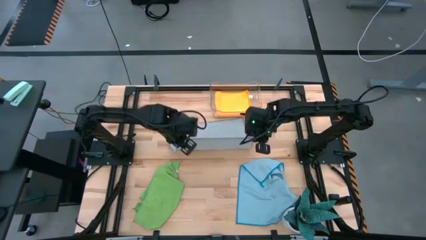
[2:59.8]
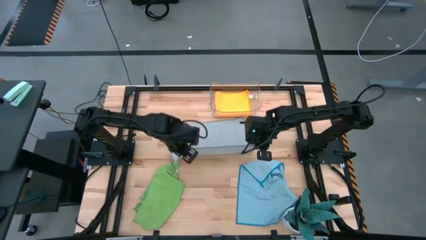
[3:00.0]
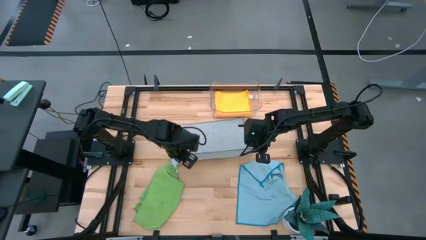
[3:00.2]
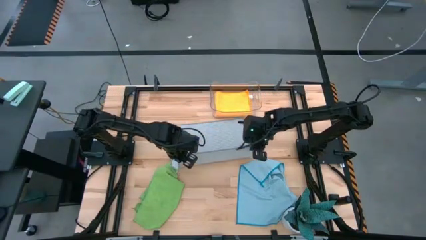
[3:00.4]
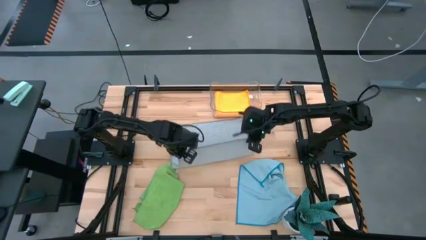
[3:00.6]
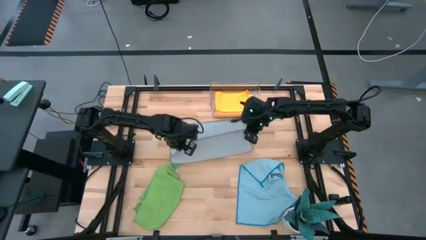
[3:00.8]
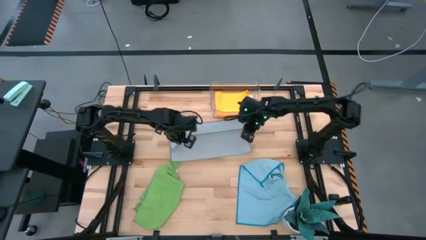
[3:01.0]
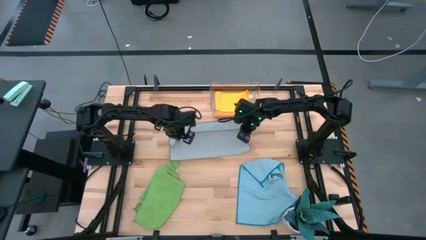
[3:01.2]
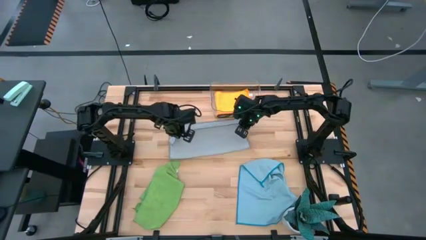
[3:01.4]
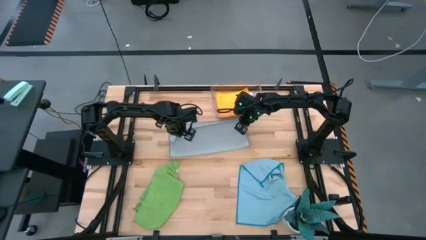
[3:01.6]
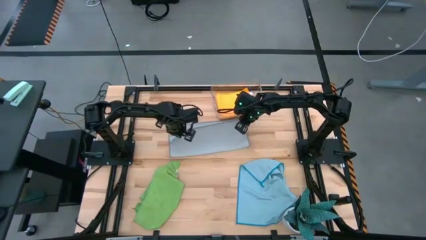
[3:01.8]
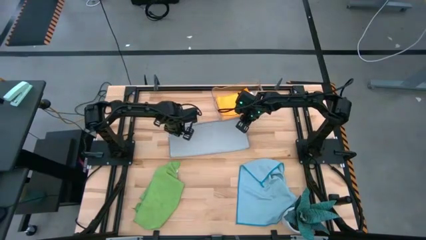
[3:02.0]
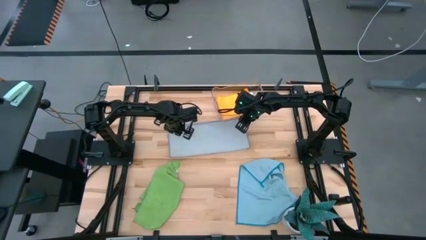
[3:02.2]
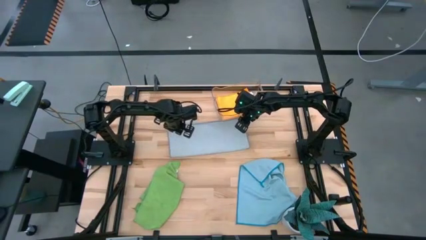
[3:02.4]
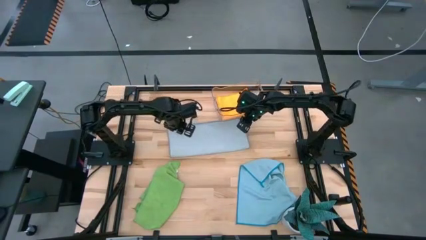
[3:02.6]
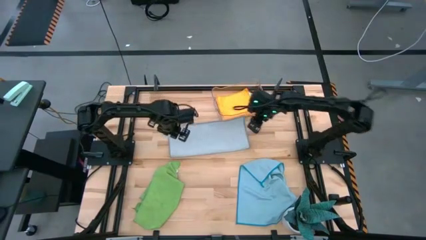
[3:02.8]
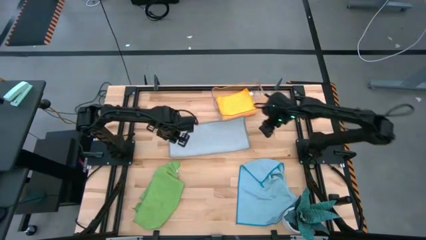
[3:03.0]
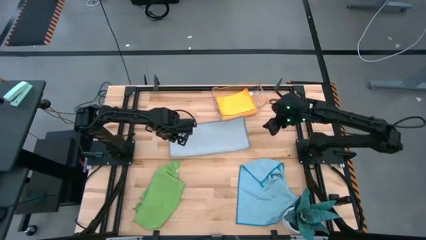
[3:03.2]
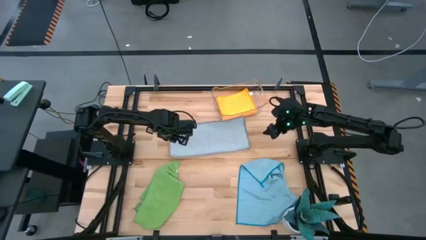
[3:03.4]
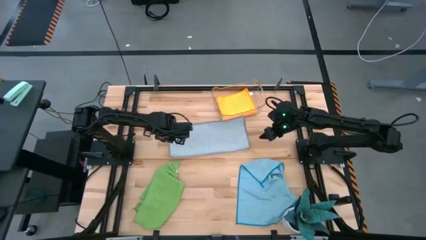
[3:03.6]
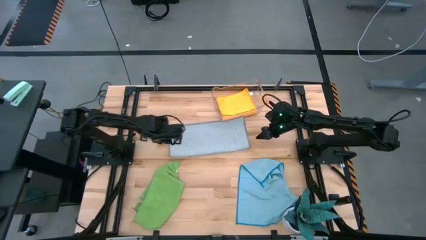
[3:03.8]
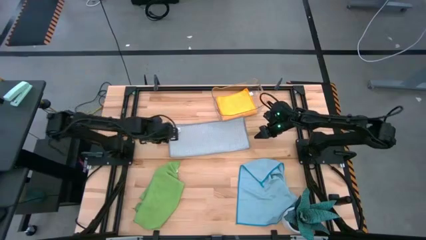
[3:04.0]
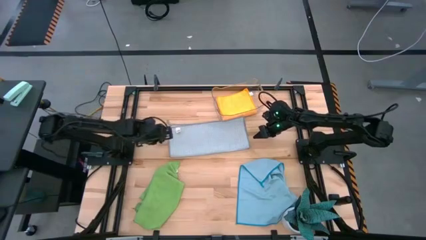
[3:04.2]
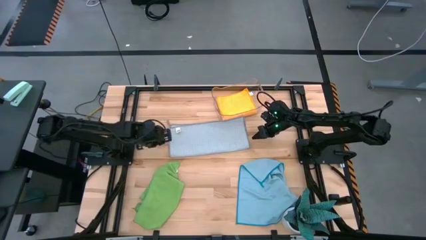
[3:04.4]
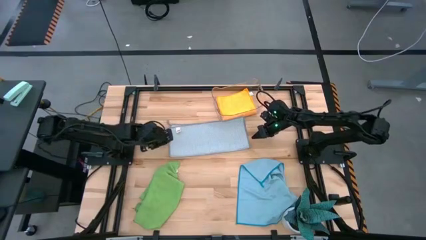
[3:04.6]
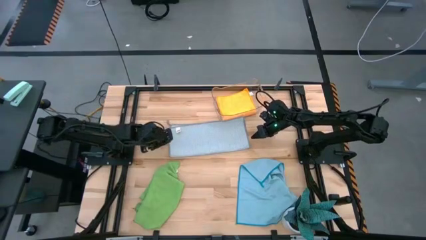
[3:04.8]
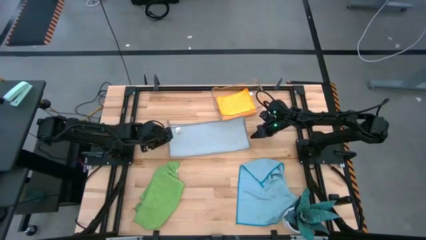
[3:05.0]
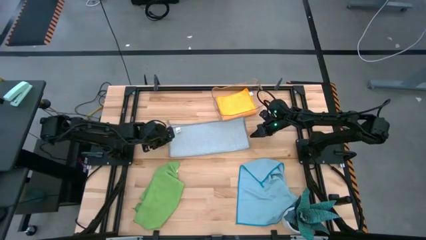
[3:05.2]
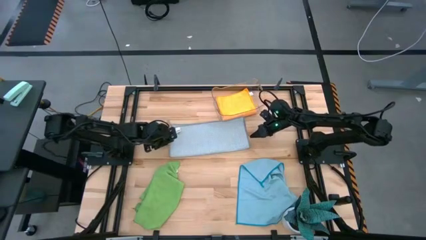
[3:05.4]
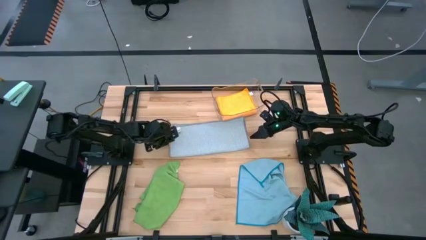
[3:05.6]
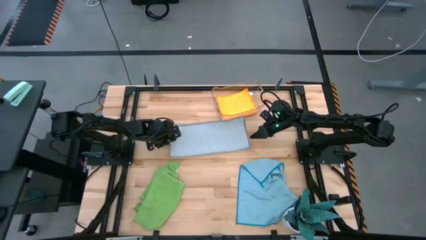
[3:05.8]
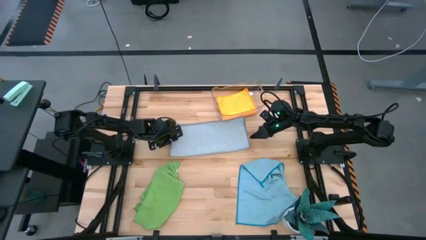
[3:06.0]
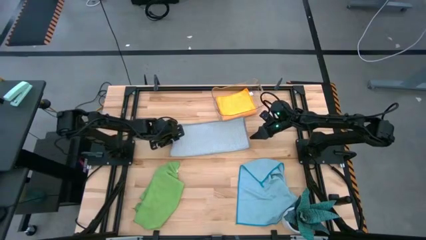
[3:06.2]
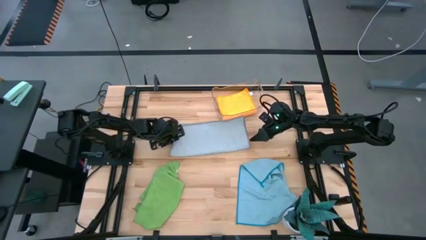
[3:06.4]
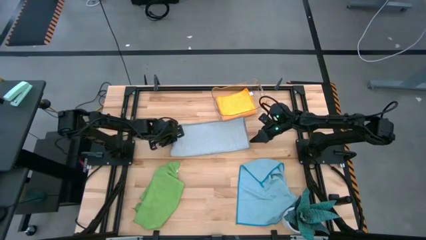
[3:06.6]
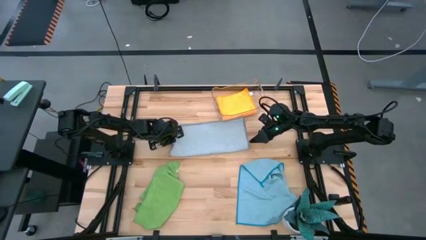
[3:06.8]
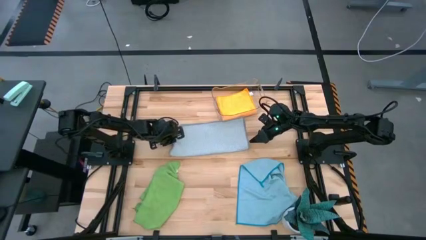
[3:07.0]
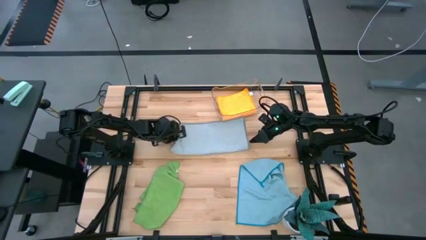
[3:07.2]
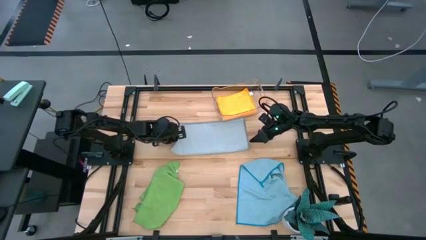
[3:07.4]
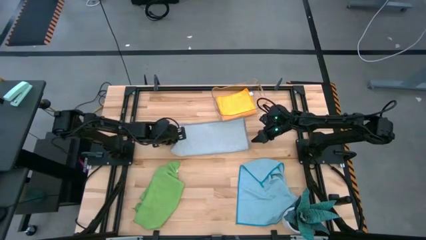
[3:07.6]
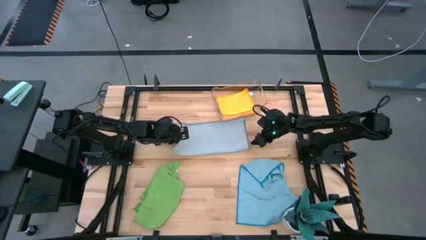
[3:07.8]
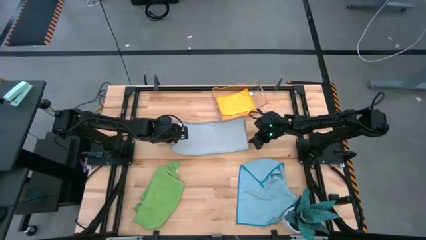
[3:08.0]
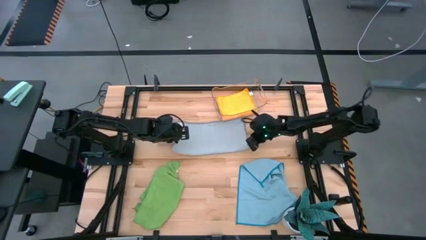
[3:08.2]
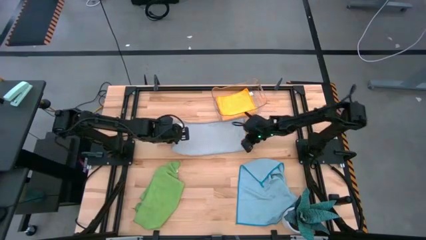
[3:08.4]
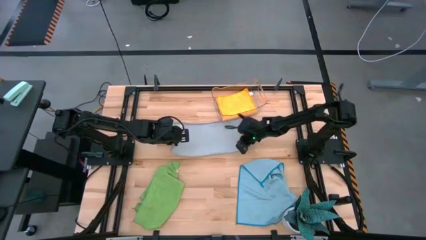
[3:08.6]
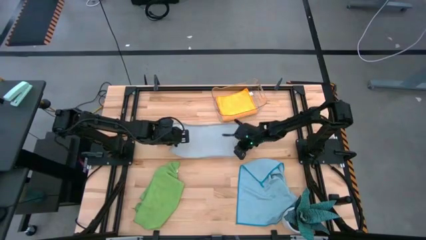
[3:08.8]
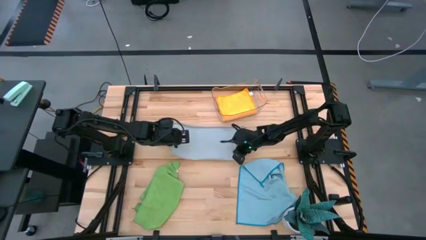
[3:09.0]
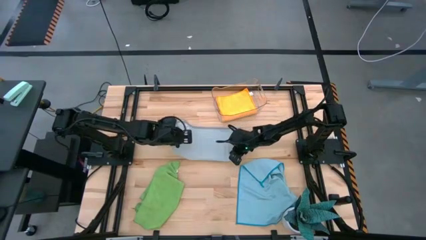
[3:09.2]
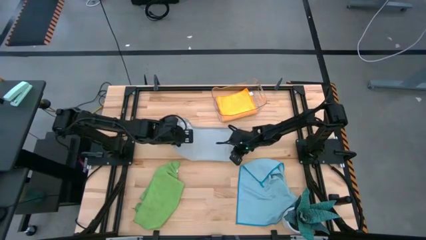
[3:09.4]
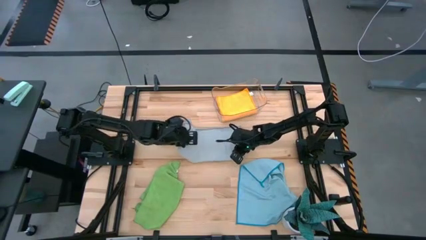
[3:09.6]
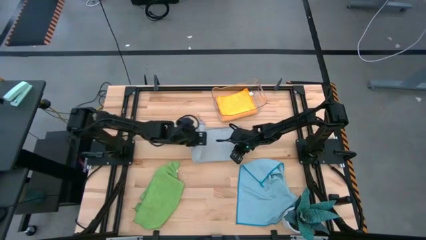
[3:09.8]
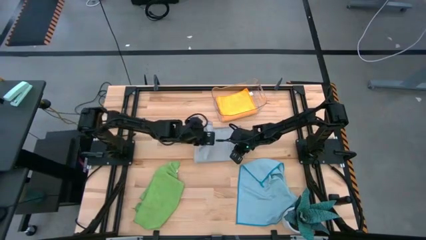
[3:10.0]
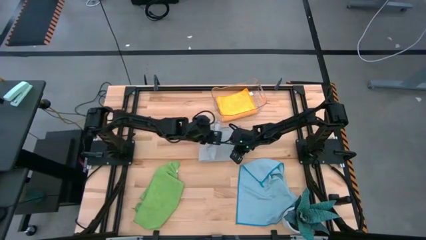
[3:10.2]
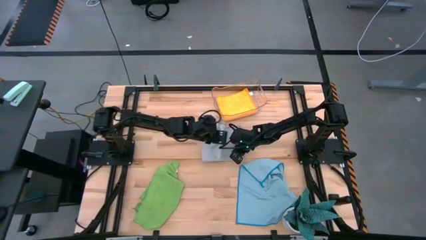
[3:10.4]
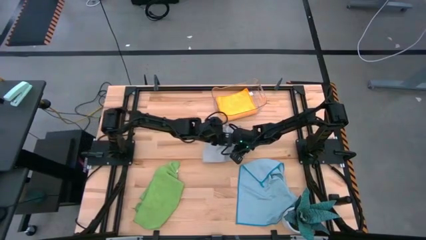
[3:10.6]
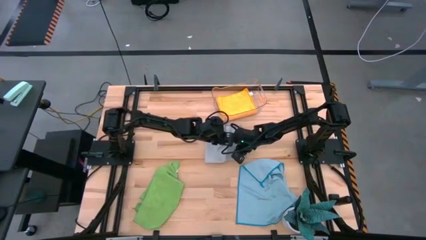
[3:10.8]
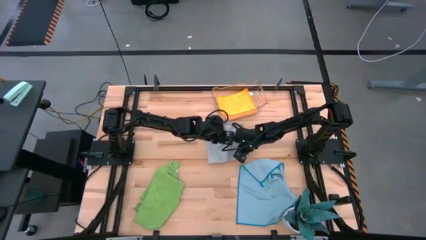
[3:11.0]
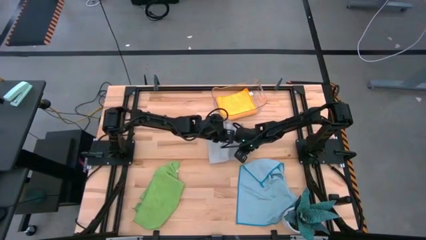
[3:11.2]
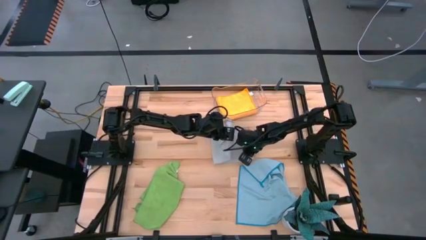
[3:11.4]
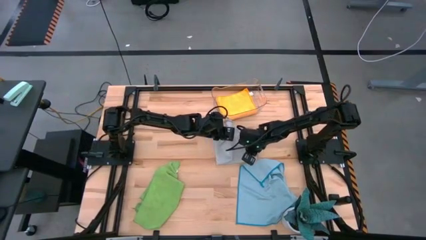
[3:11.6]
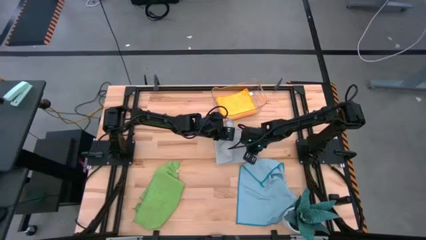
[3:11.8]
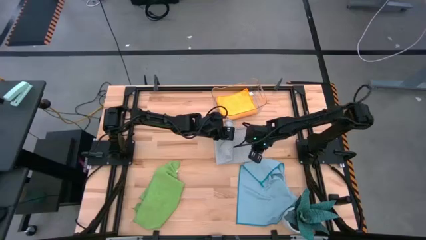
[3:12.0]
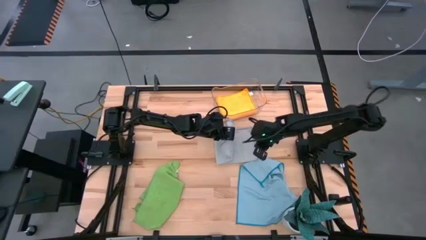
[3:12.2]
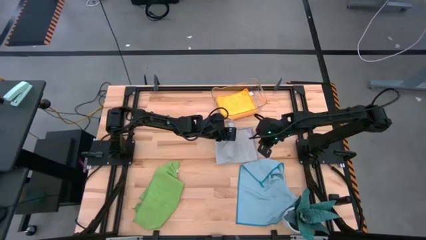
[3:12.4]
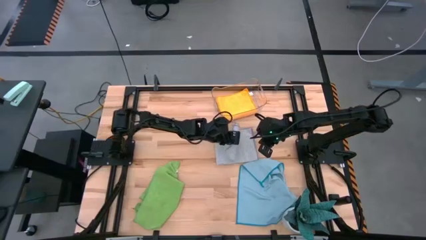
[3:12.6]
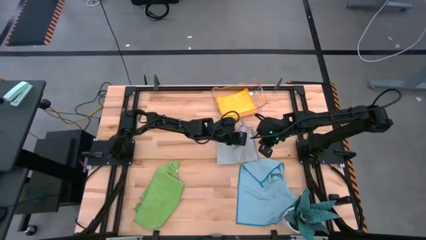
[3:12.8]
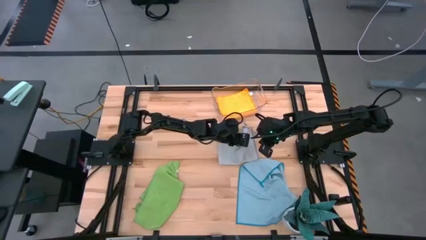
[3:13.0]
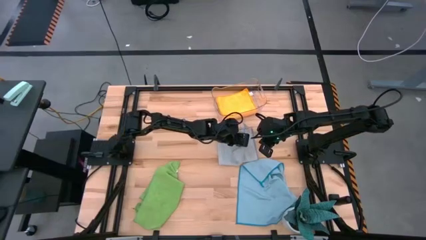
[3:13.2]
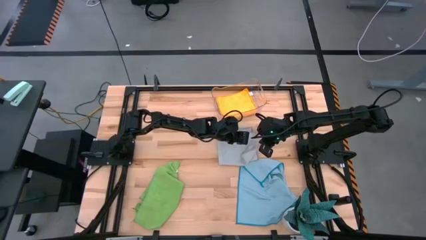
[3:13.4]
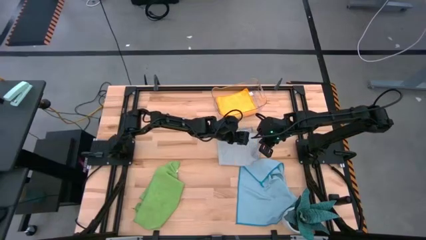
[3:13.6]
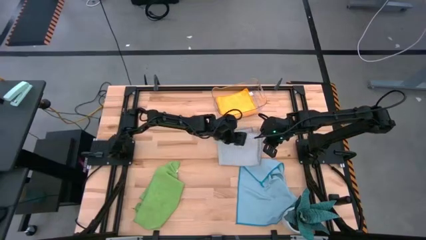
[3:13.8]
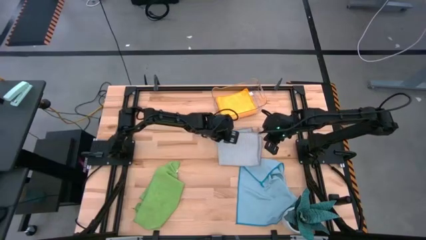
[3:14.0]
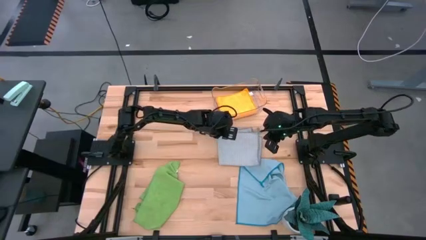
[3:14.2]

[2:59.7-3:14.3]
Task: Fold microfiber towels
Fold the gray microfiber cloth
